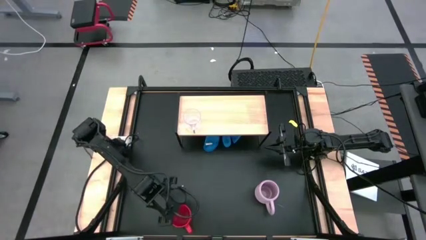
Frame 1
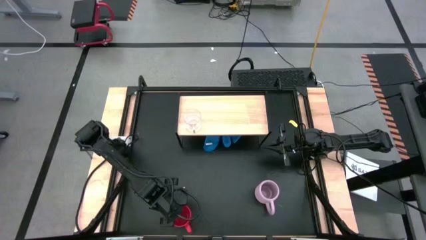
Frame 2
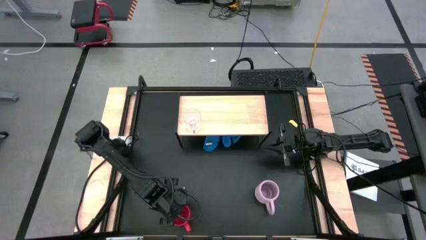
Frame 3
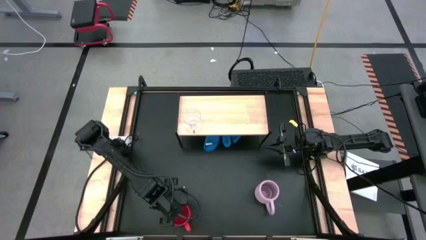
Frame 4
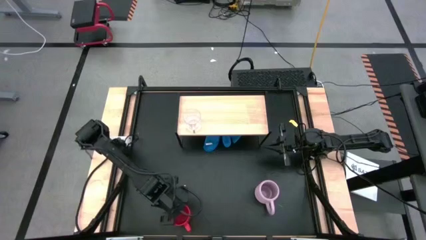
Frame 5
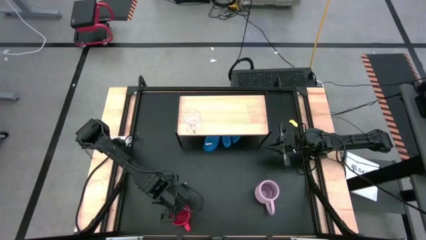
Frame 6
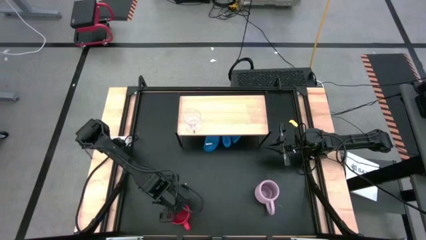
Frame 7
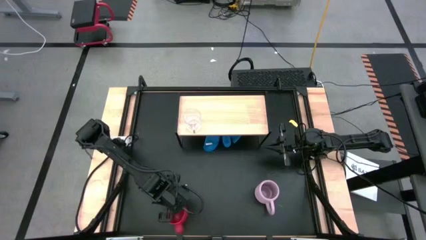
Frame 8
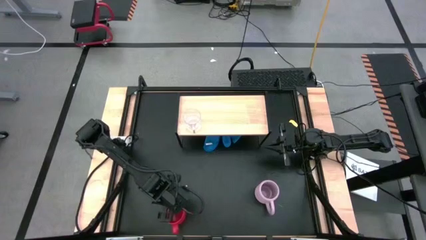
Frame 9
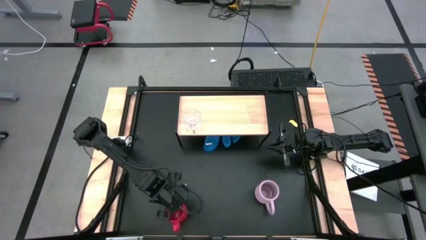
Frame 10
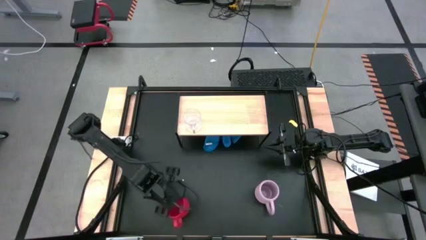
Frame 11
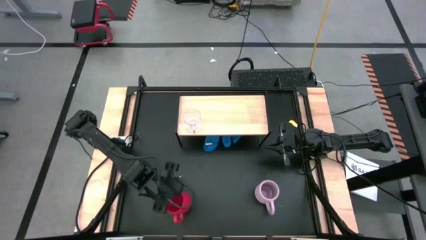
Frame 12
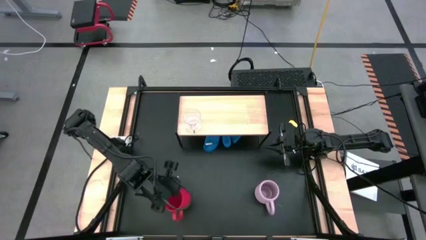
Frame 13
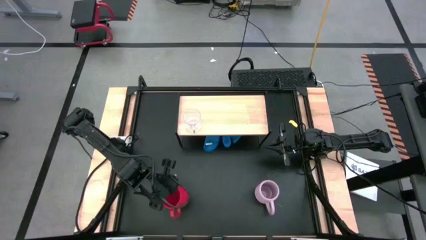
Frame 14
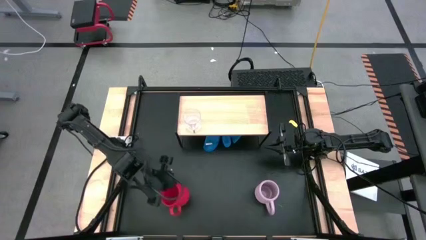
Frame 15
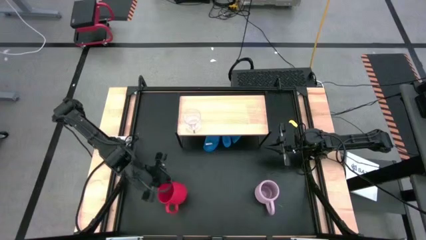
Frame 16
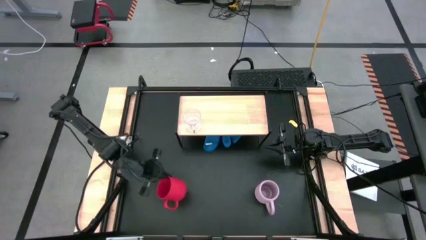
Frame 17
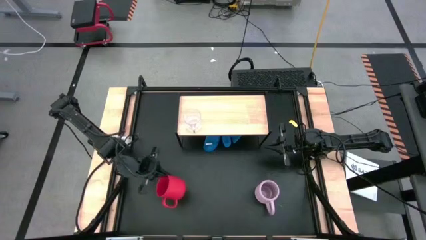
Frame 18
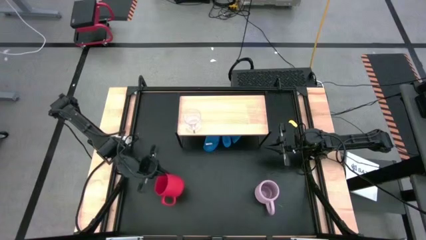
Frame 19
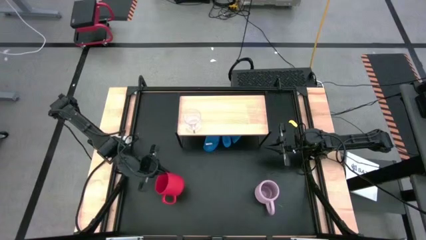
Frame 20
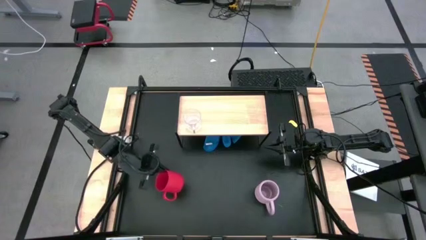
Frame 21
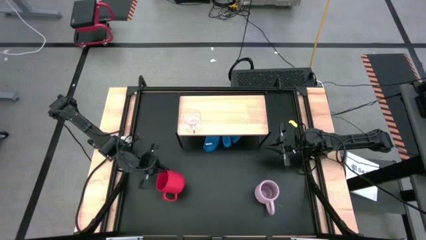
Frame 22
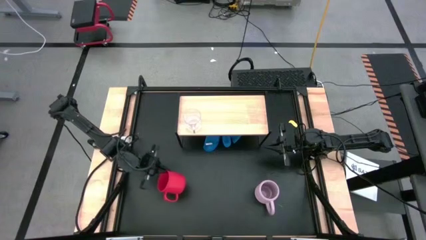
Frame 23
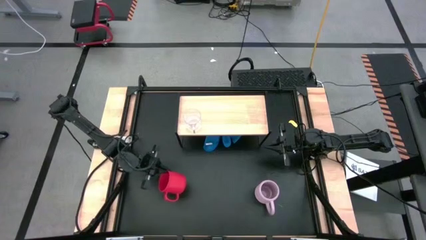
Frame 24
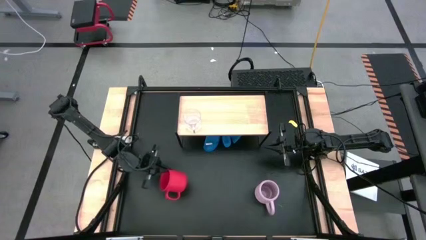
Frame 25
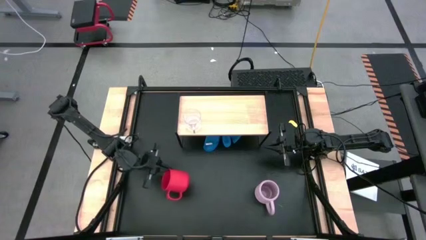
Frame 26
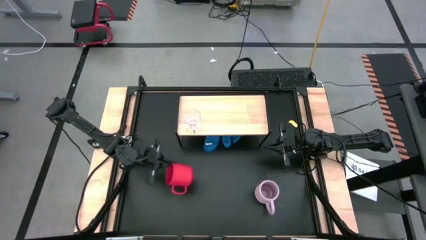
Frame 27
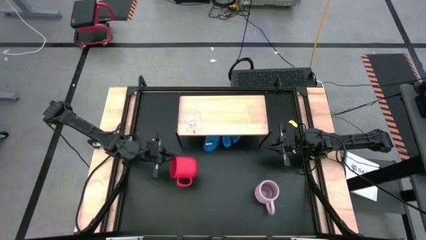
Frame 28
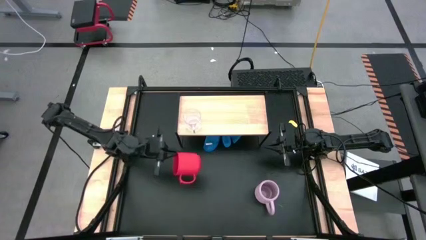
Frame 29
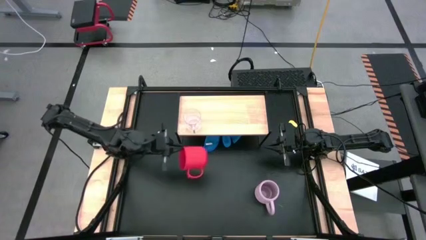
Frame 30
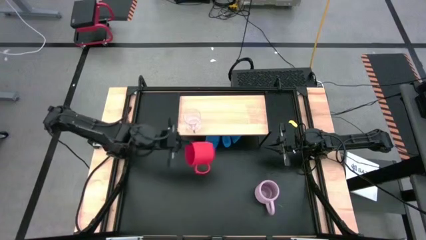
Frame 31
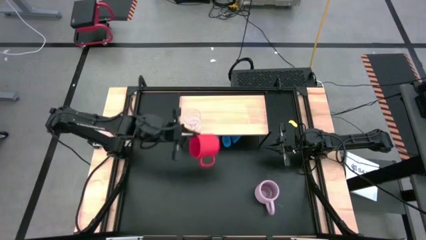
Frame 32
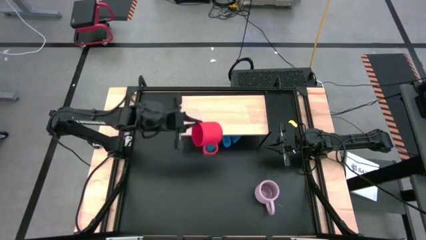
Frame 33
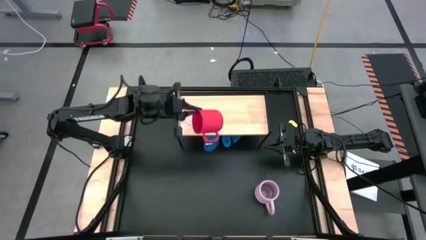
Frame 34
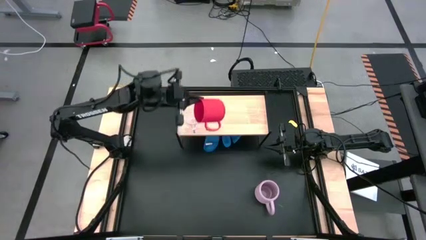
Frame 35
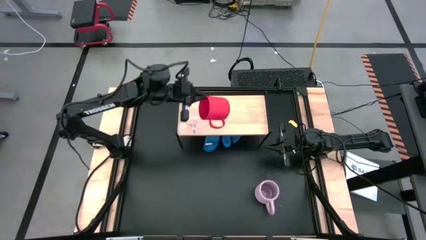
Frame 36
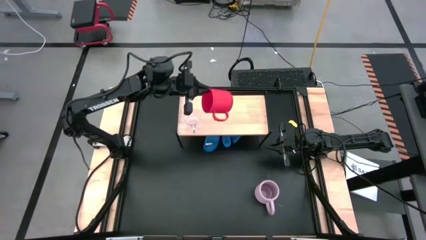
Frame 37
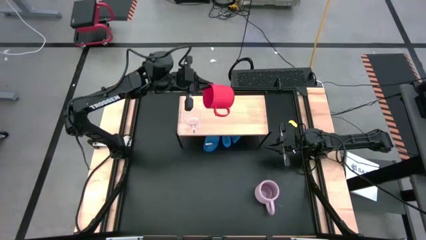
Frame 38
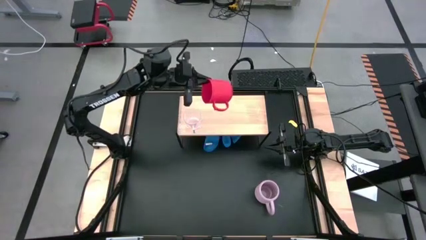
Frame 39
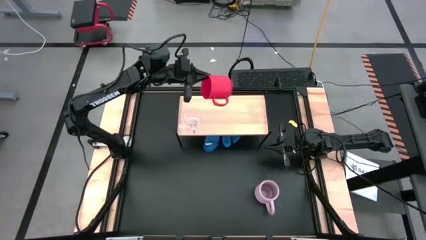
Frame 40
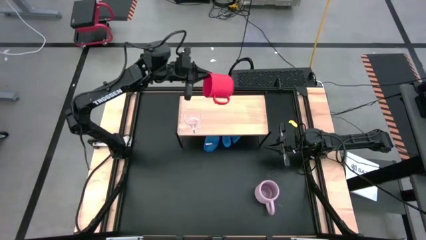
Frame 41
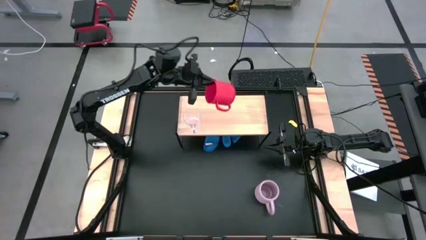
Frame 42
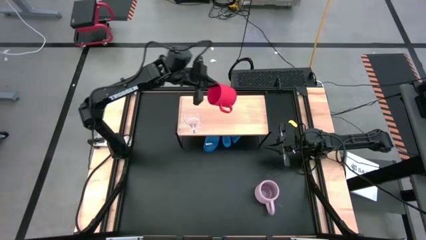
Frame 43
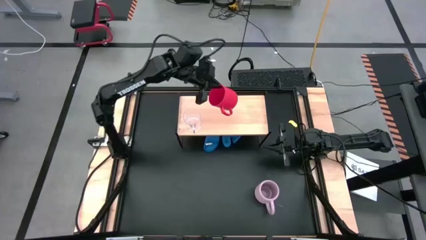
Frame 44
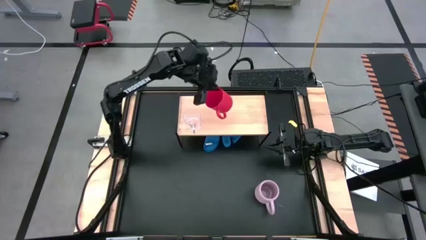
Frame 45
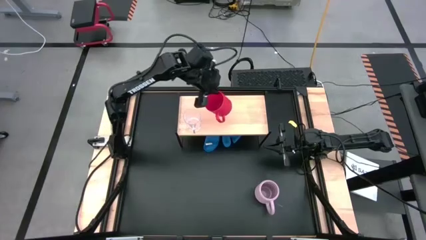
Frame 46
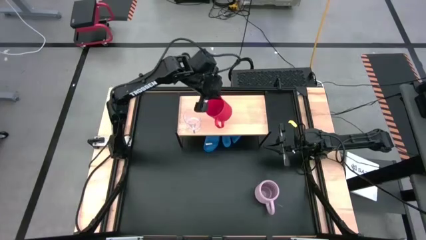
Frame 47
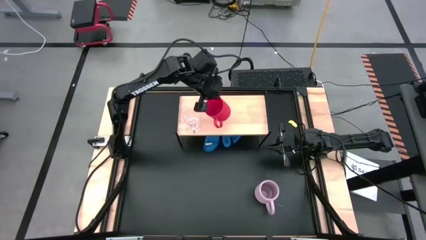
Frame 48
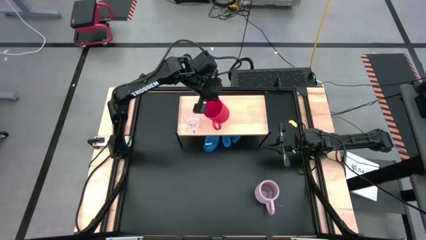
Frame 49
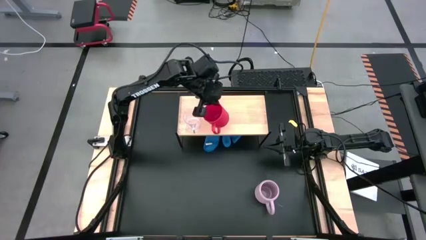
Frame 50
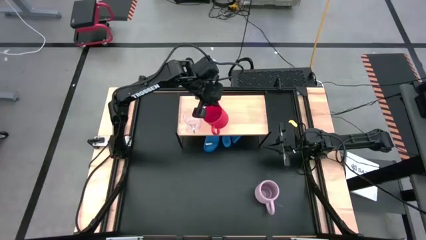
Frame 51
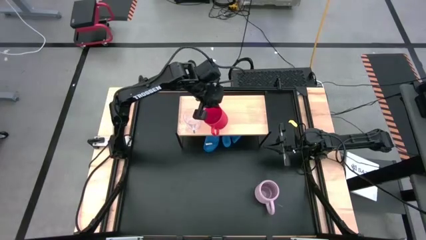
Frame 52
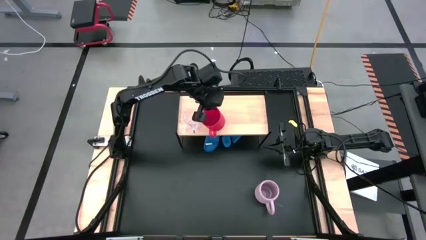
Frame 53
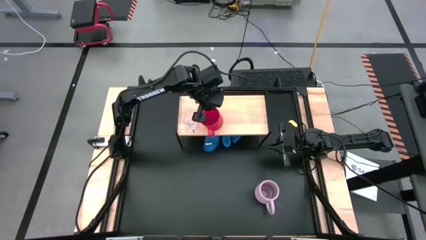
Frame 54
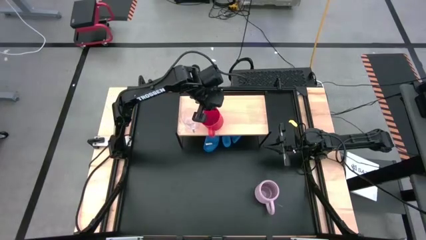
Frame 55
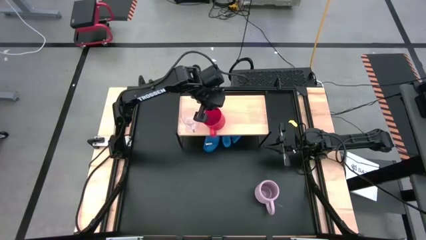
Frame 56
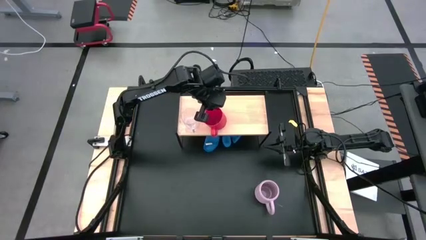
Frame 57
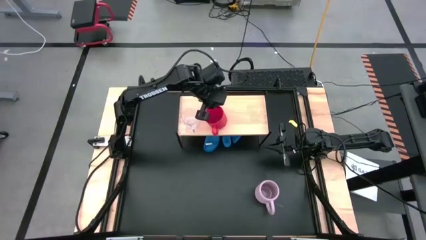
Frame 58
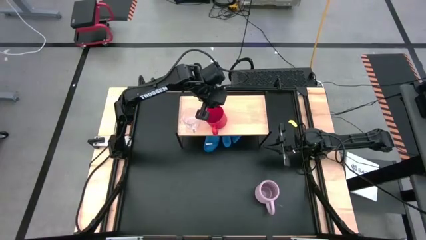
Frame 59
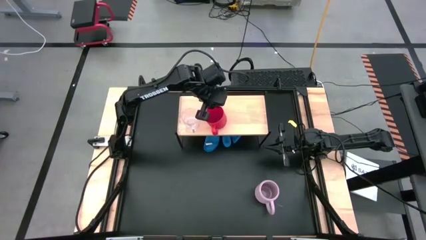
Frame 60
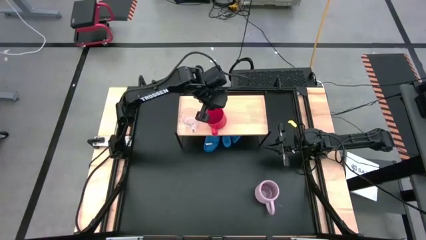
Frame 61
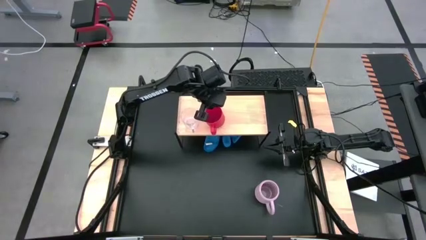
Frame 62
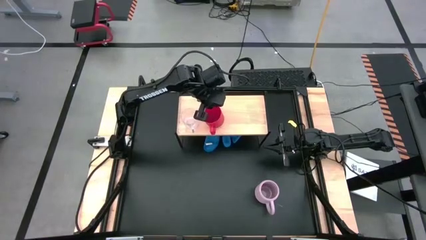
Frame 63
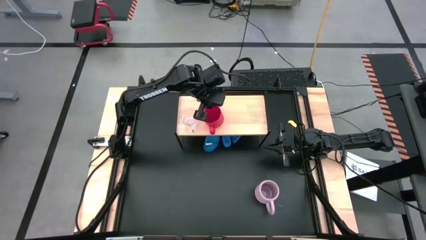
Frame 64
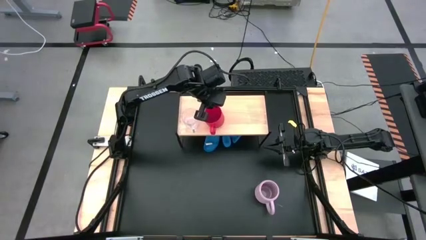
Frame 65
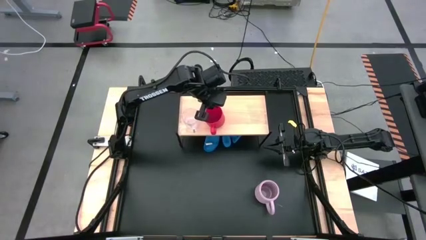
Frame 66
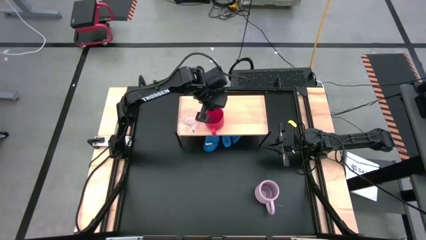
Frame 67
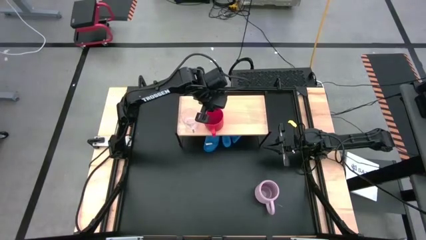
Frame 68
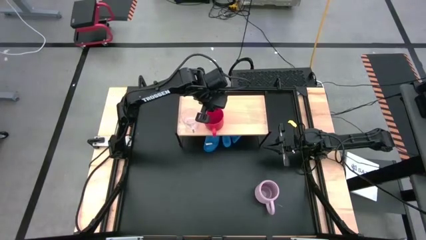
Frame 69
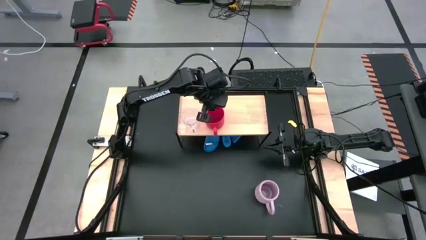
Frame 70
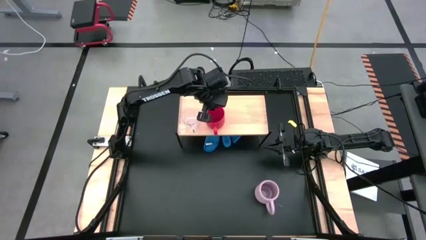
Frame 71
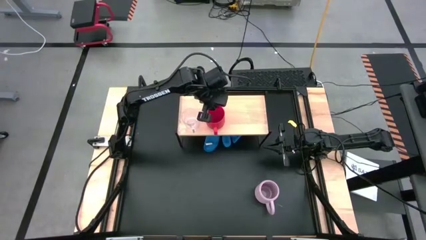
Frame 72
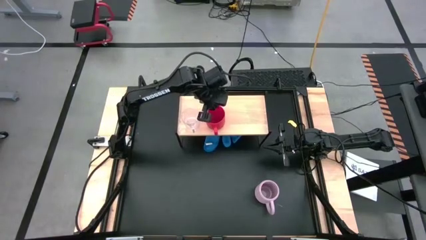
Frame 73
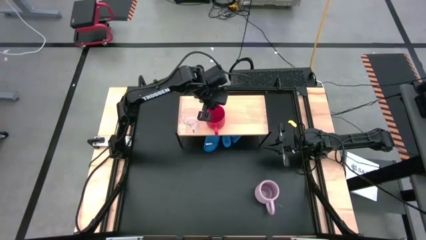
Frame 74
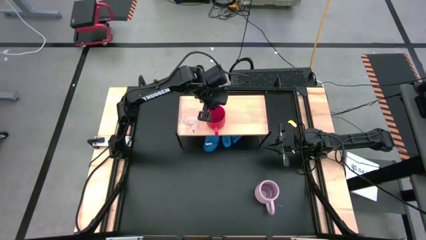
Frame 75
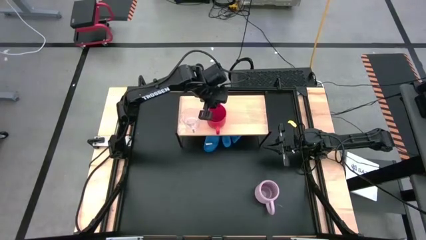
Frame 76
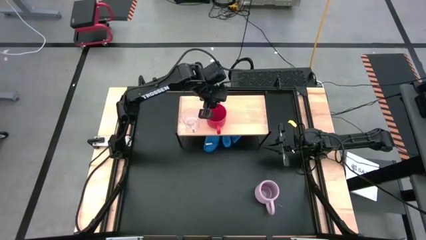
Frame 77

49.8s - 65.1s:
Task: Stack small to large cups/mugs on shelf
Put the red mug on the shelf
